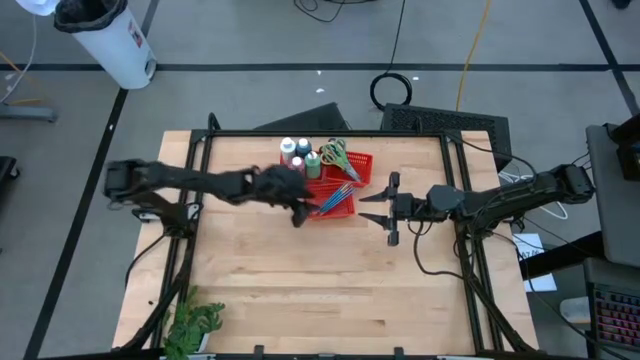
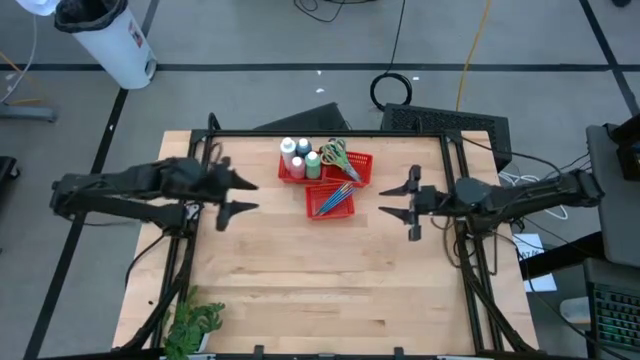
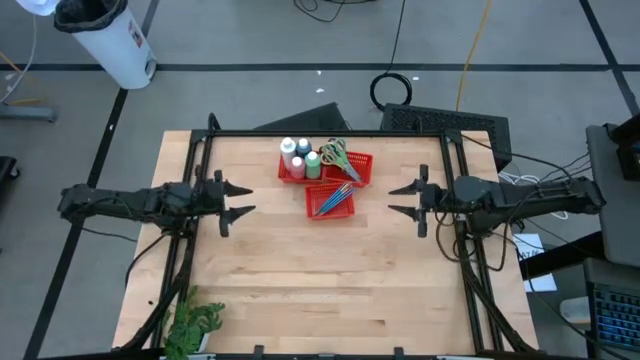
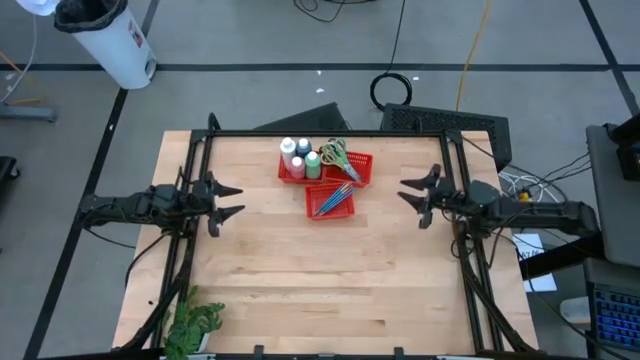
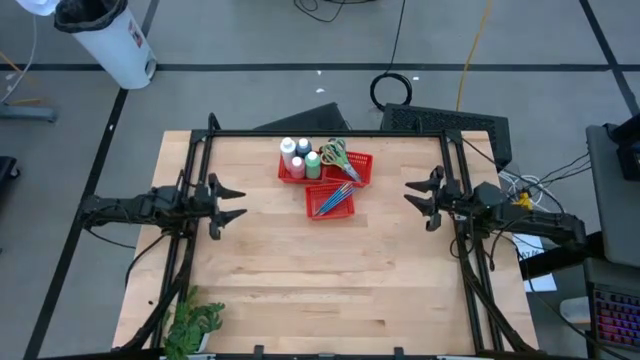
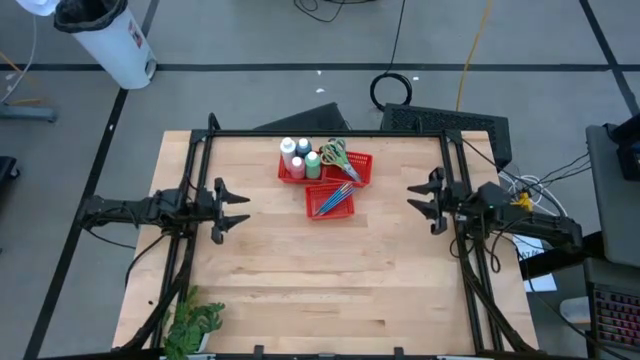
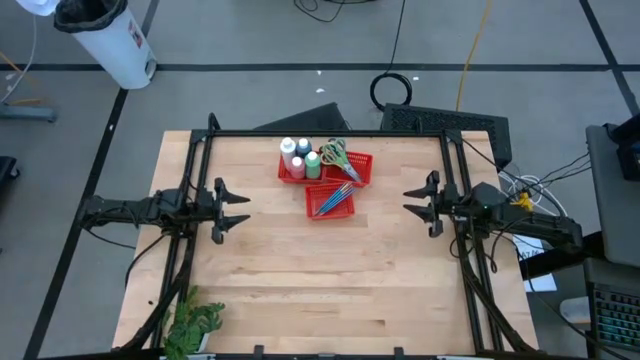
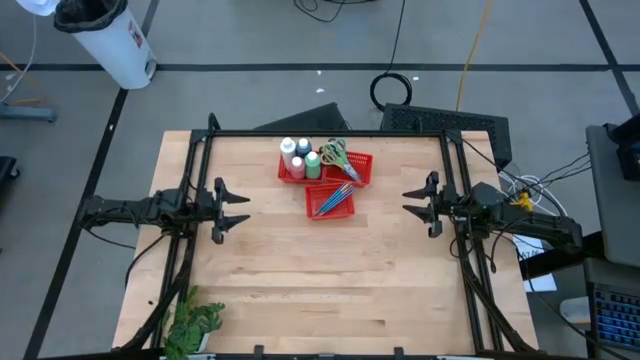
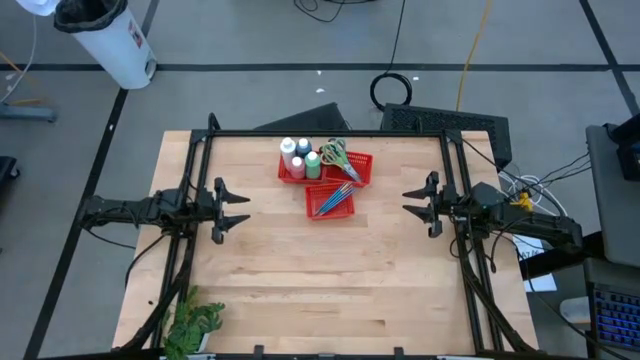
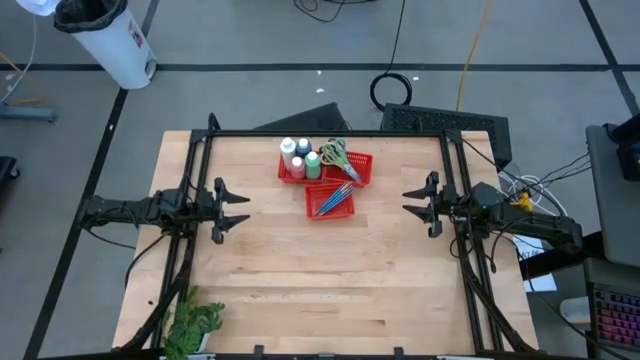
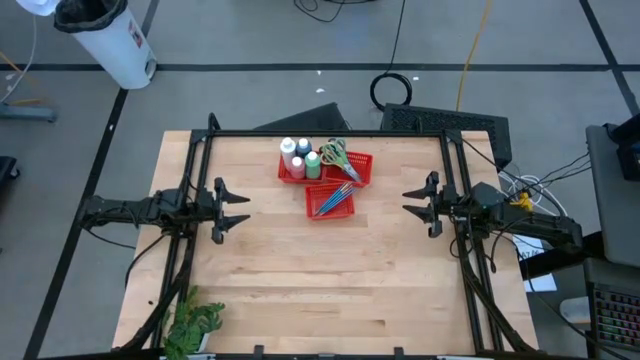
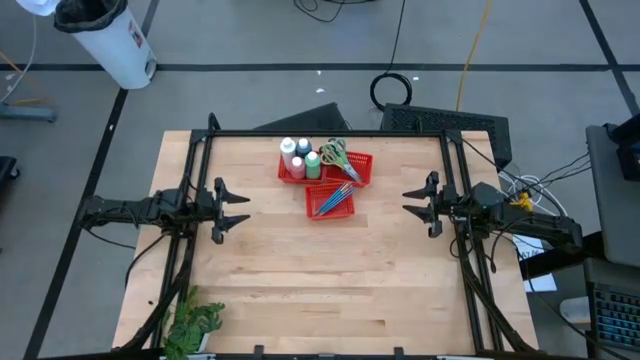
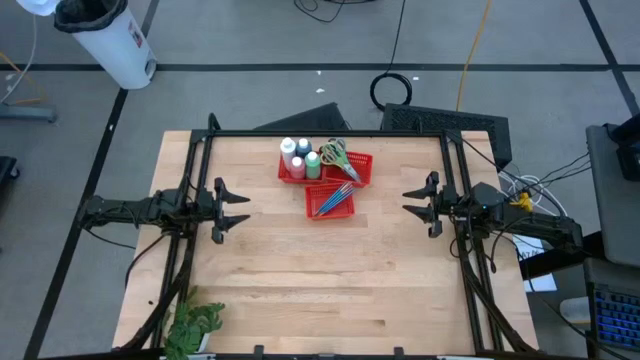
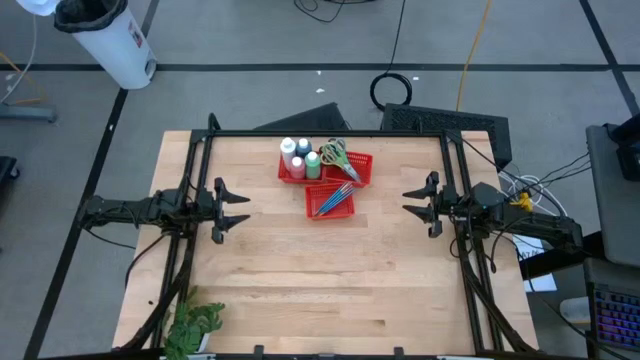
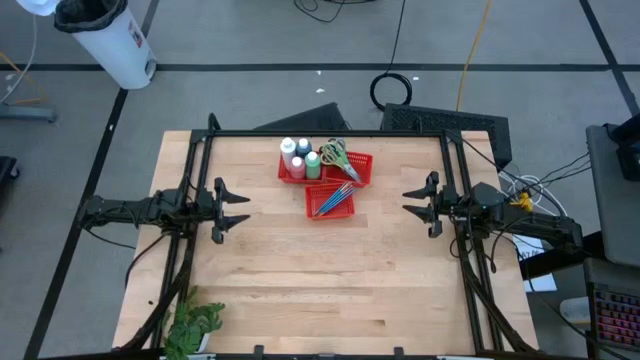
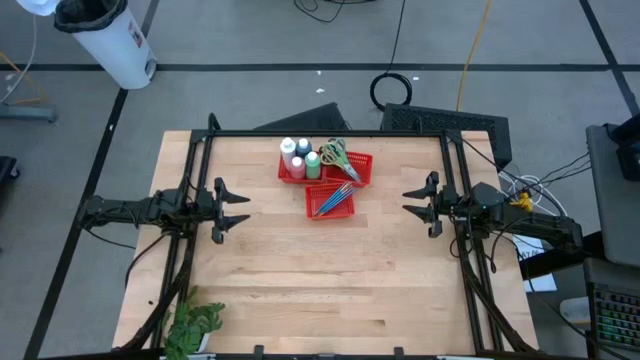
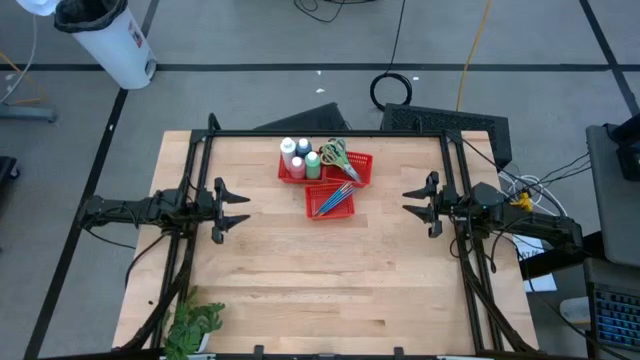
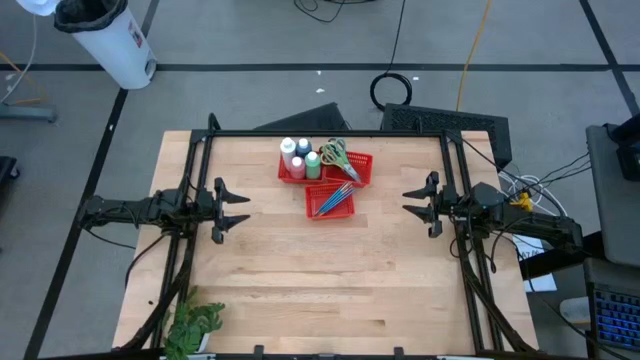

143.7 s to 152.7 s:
Task: Pick & Place Paint Supplies
Return to Home Position

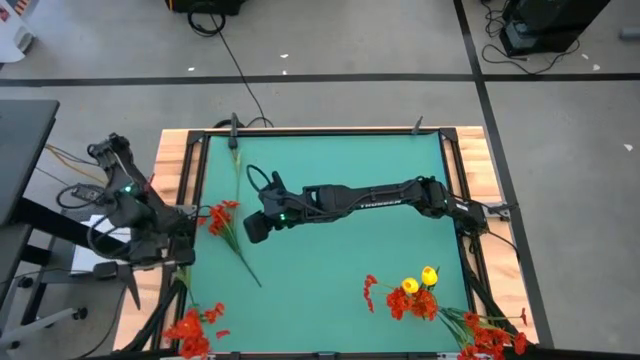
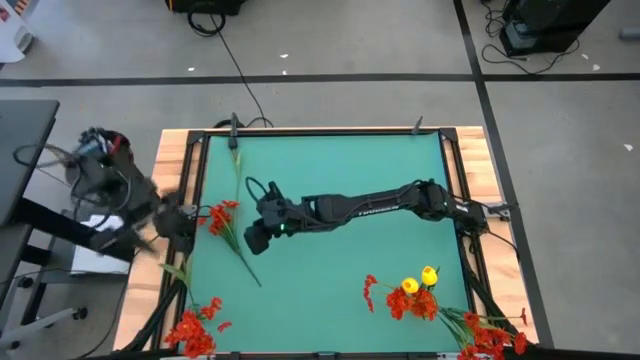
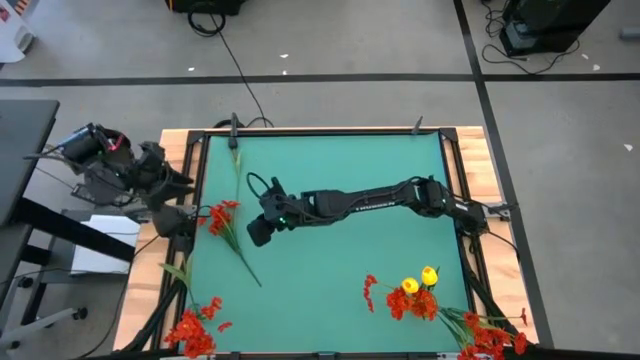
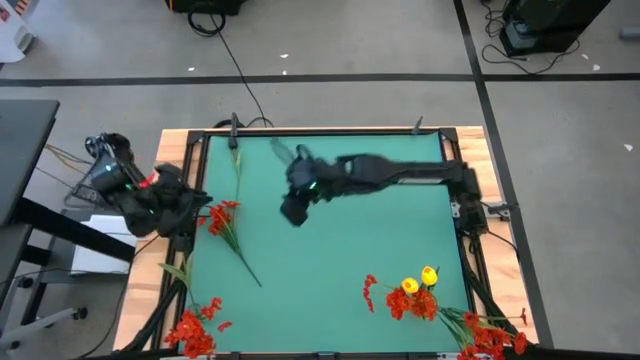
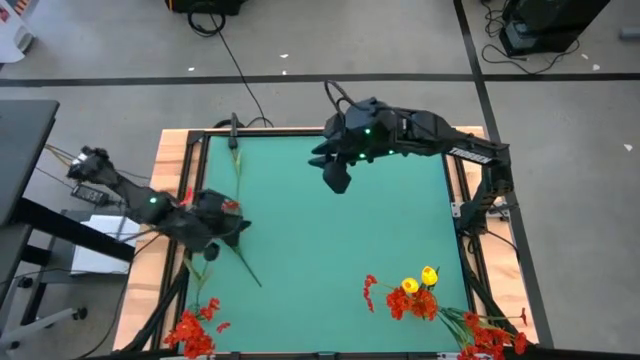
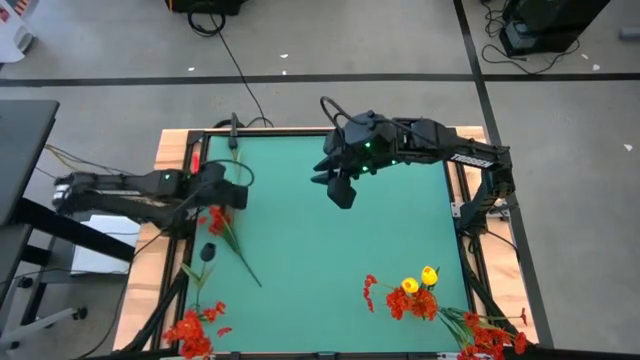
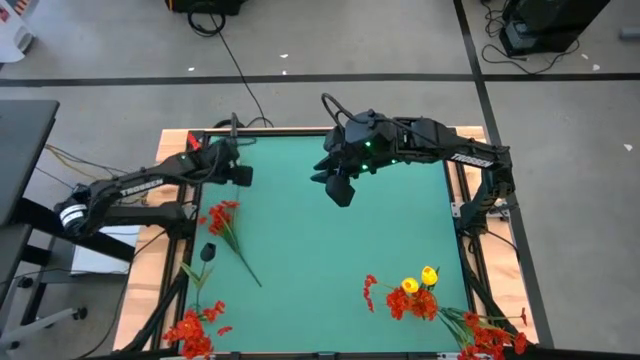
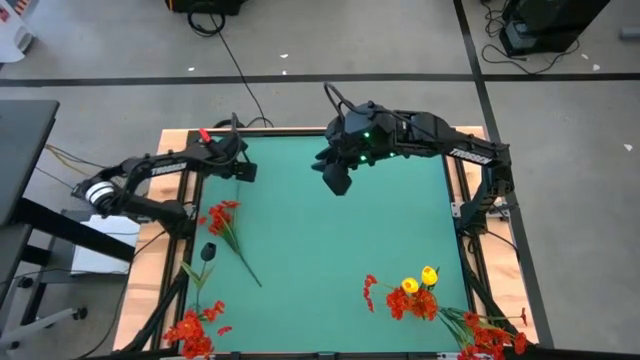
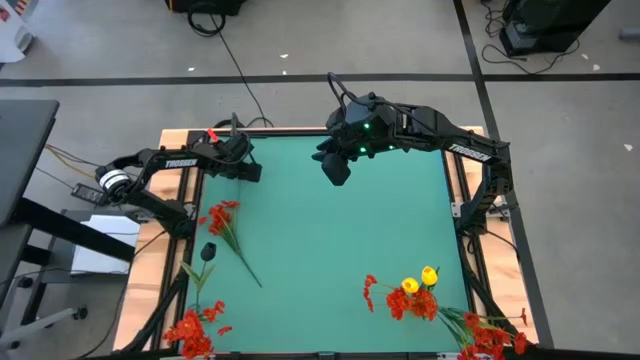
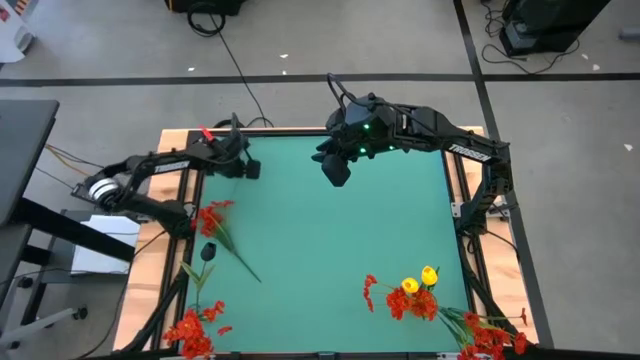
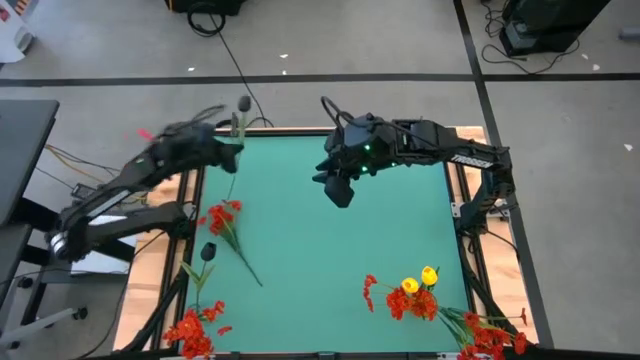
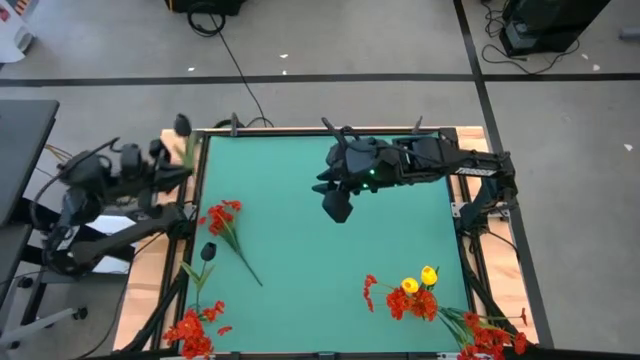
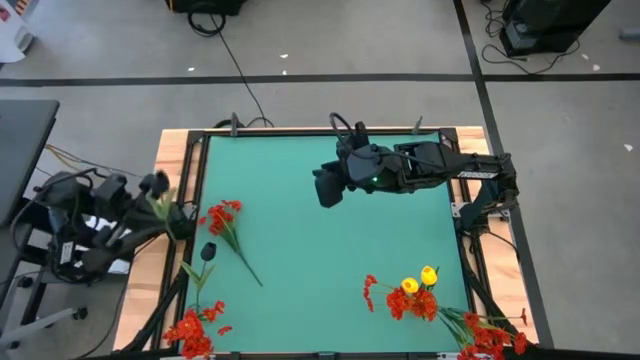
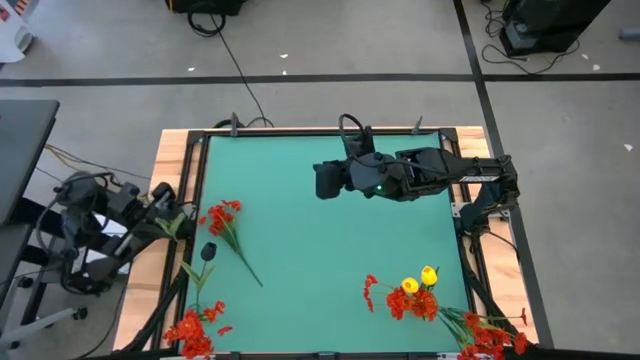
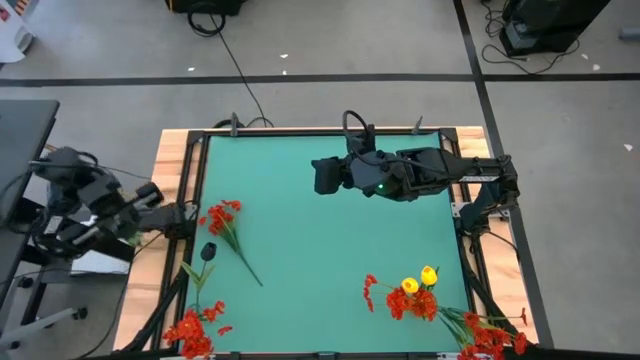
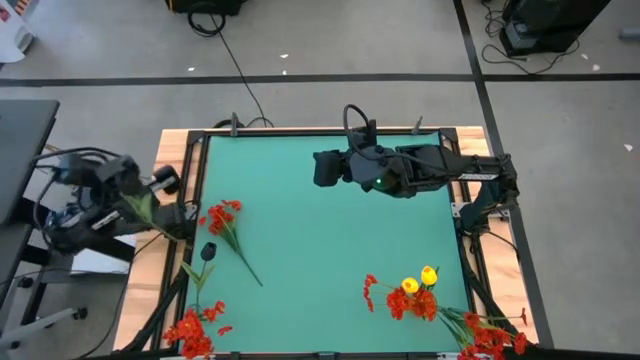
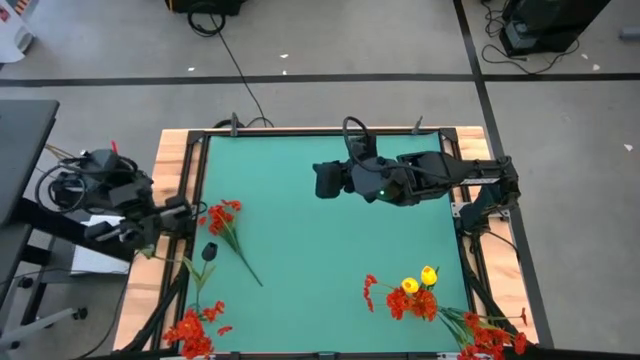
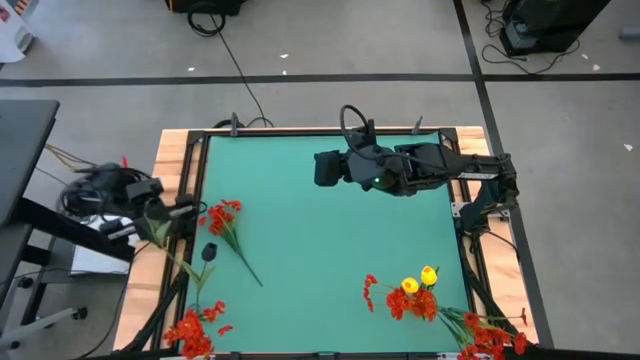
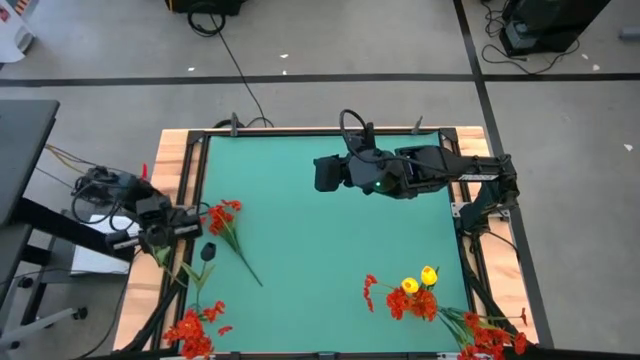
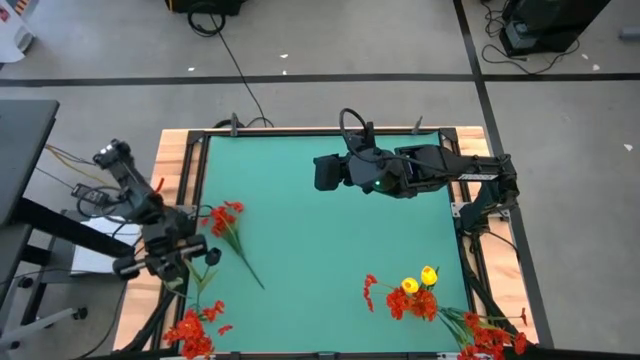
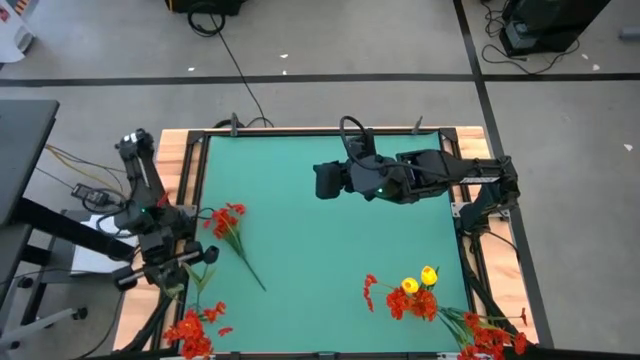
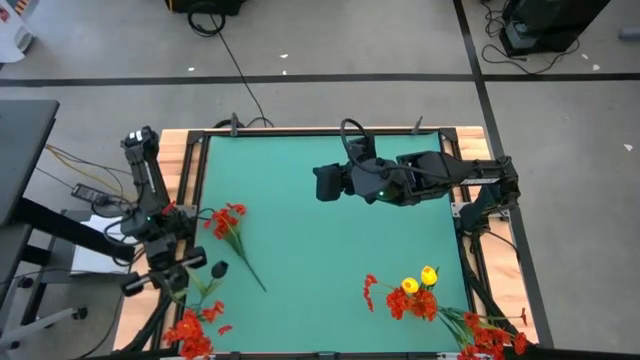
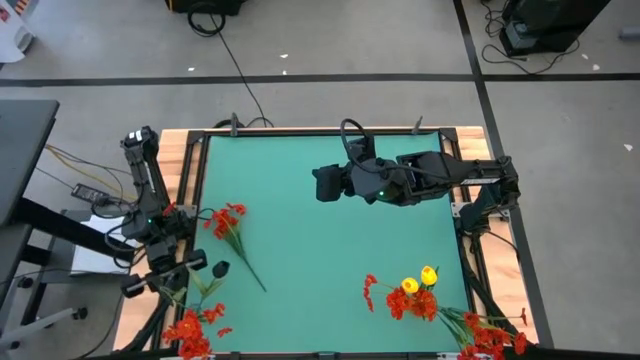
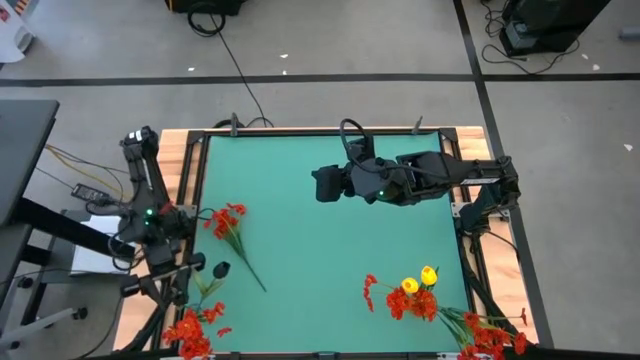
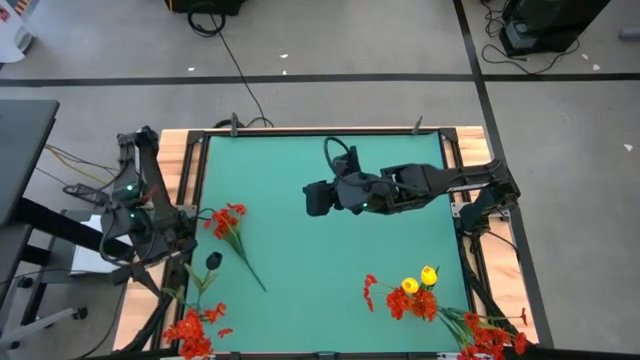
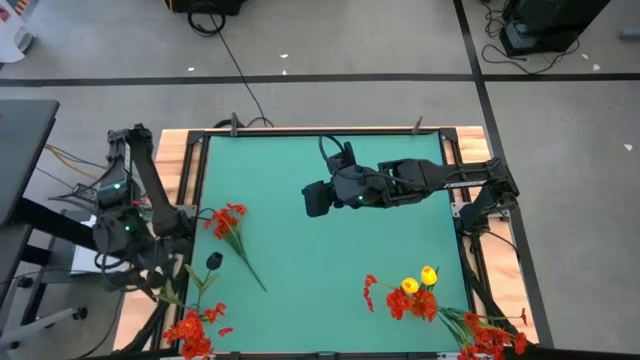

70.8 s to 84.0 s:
Task: Sort flowers into vase by color
Put the black flower into the transparent flower vase
